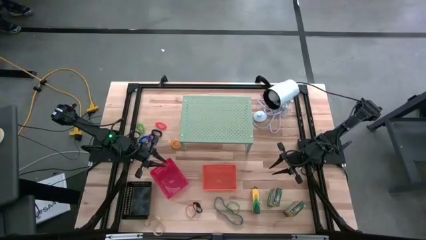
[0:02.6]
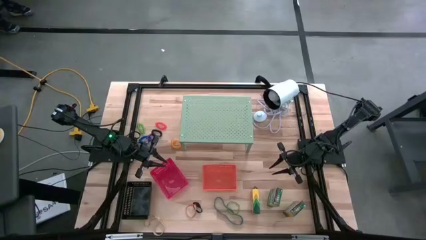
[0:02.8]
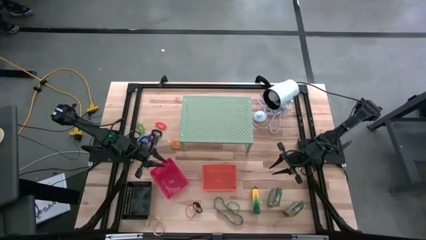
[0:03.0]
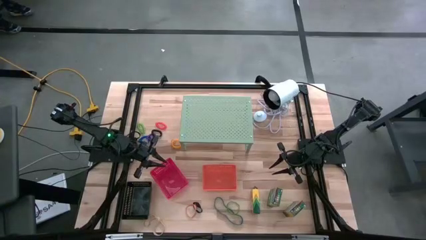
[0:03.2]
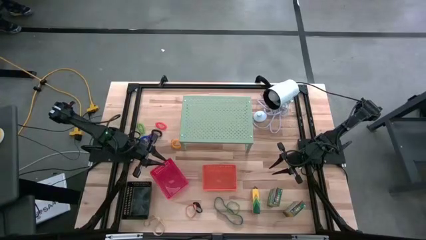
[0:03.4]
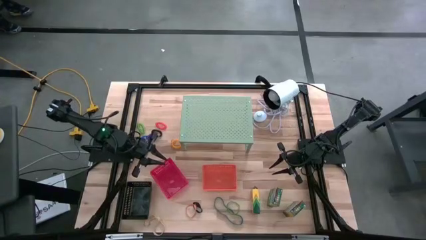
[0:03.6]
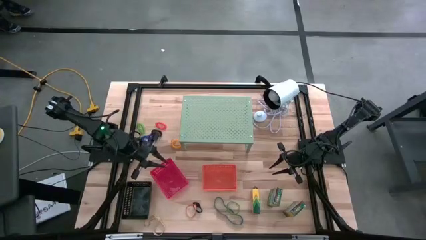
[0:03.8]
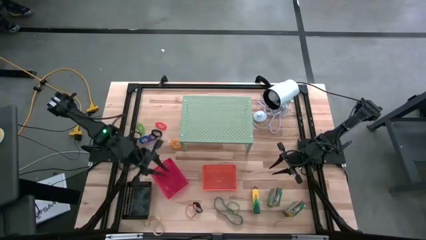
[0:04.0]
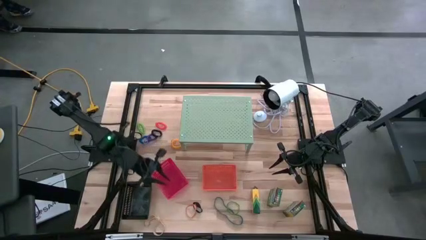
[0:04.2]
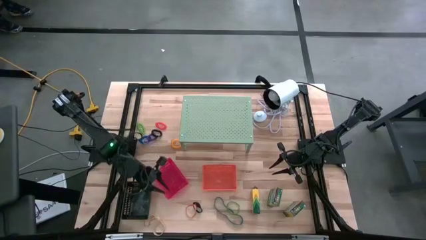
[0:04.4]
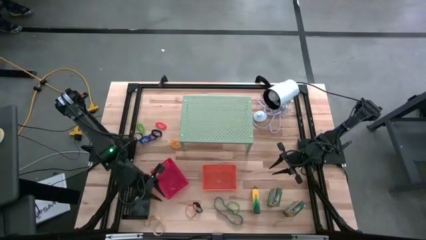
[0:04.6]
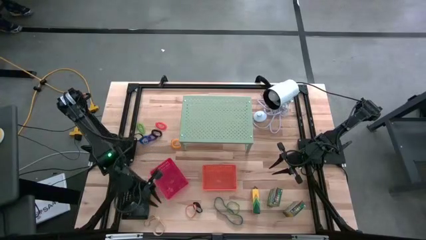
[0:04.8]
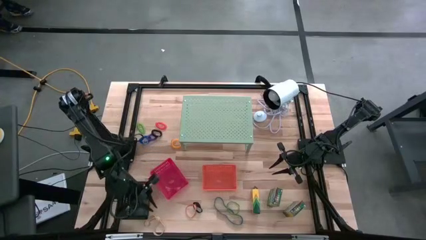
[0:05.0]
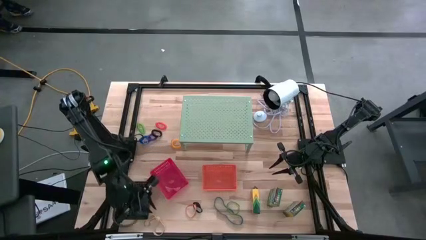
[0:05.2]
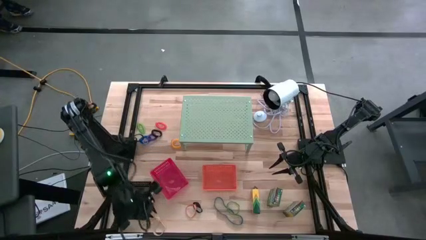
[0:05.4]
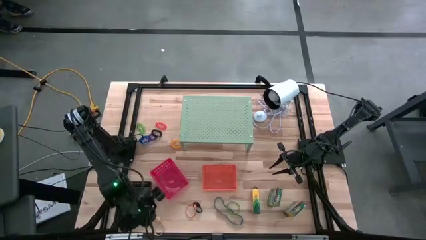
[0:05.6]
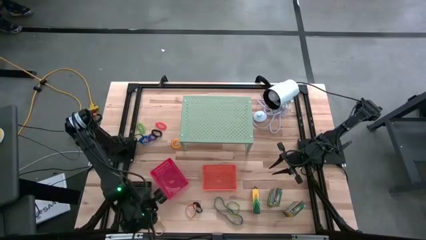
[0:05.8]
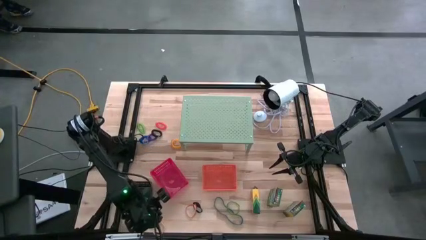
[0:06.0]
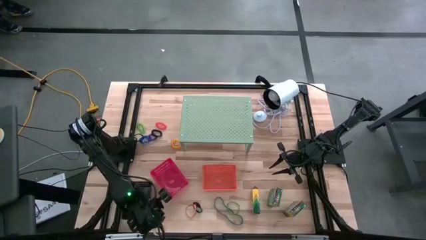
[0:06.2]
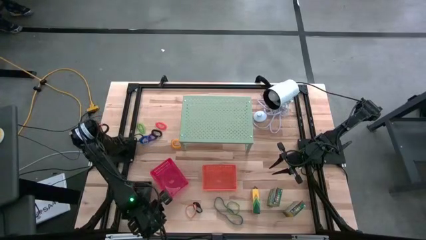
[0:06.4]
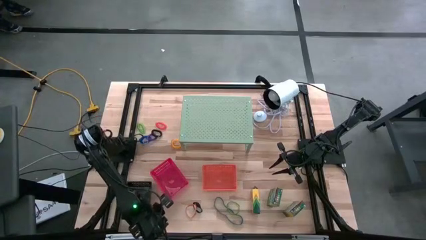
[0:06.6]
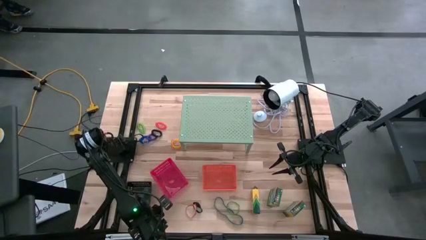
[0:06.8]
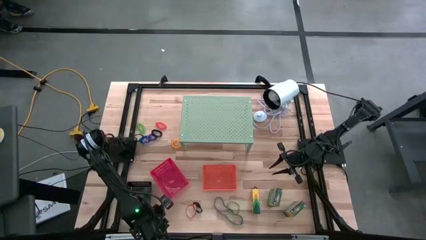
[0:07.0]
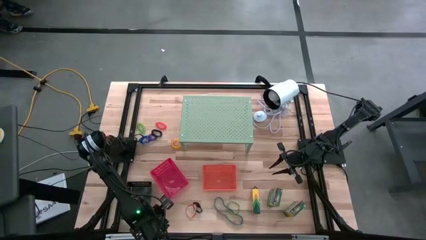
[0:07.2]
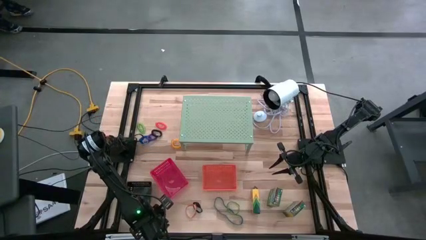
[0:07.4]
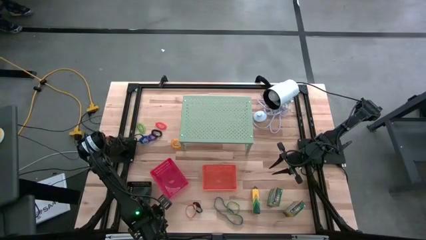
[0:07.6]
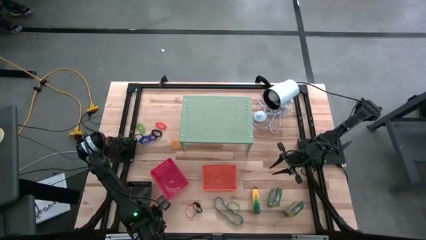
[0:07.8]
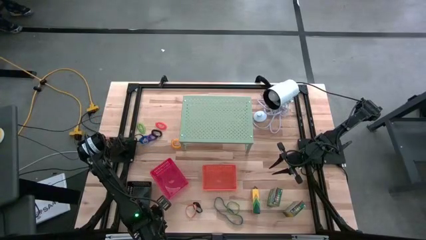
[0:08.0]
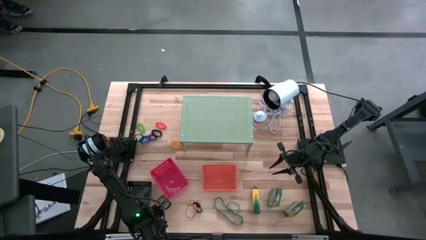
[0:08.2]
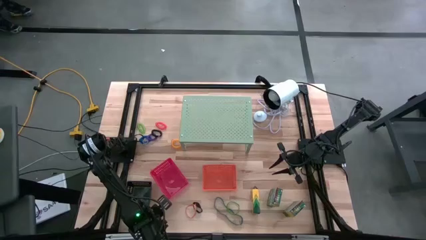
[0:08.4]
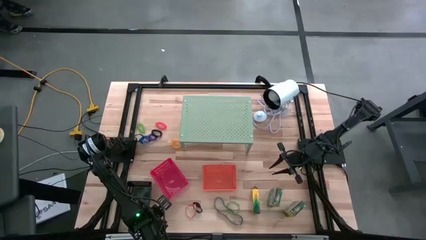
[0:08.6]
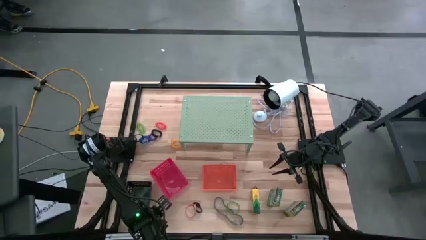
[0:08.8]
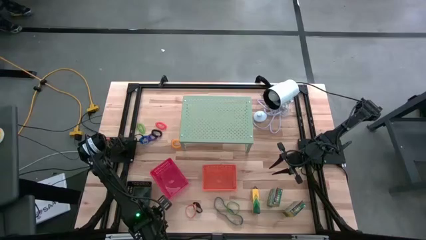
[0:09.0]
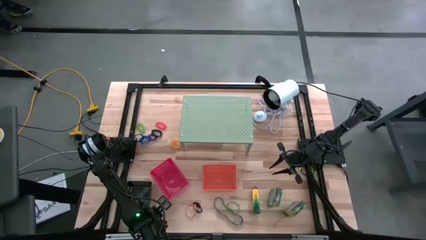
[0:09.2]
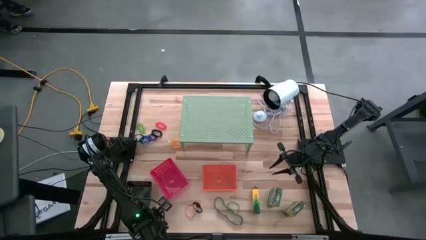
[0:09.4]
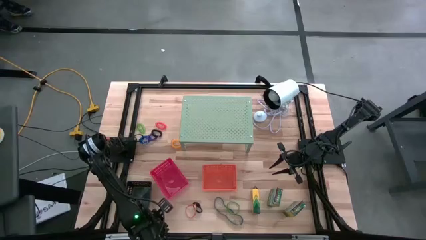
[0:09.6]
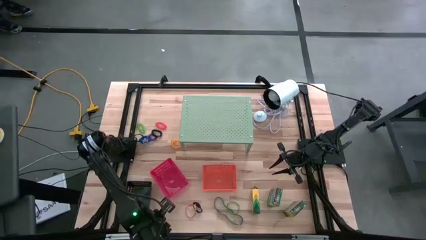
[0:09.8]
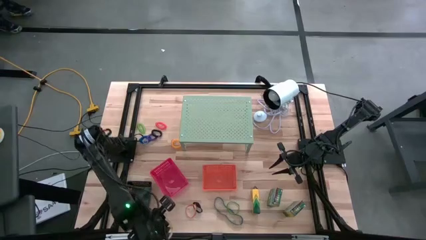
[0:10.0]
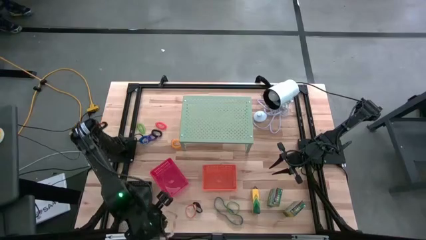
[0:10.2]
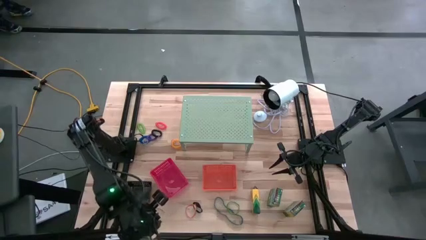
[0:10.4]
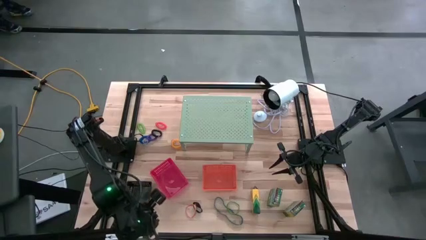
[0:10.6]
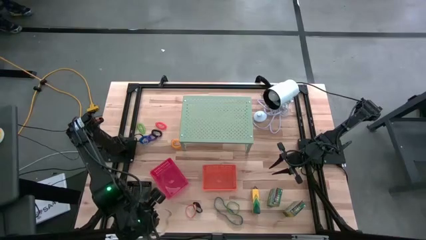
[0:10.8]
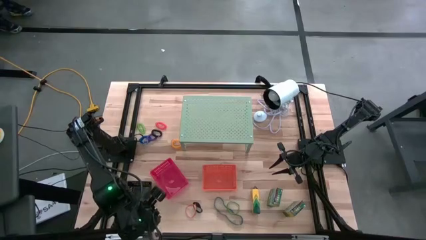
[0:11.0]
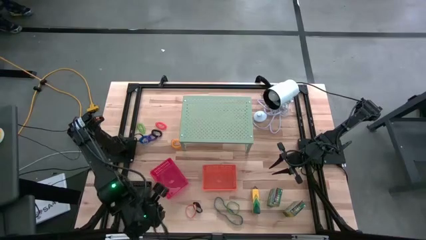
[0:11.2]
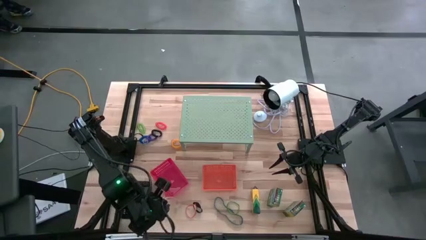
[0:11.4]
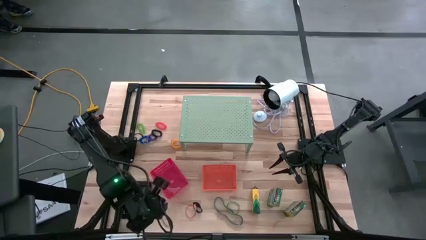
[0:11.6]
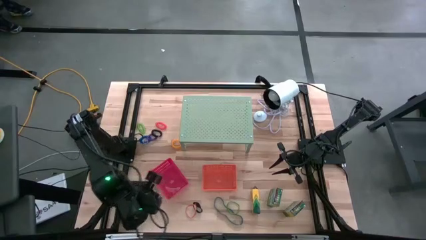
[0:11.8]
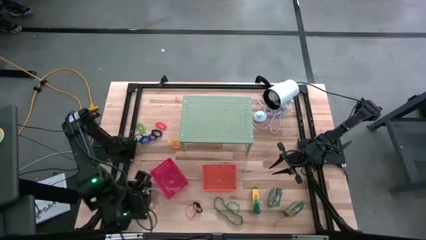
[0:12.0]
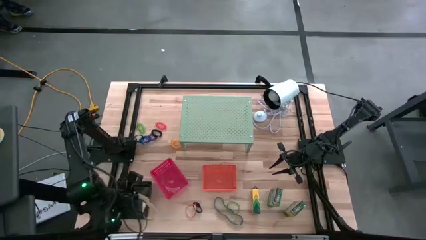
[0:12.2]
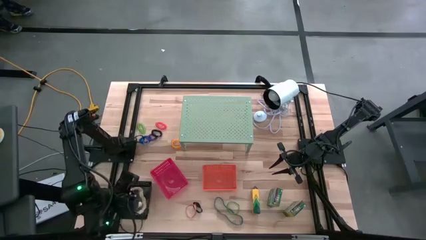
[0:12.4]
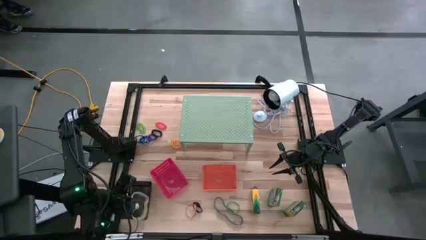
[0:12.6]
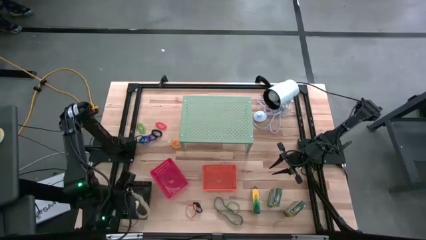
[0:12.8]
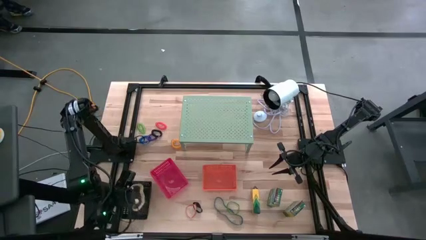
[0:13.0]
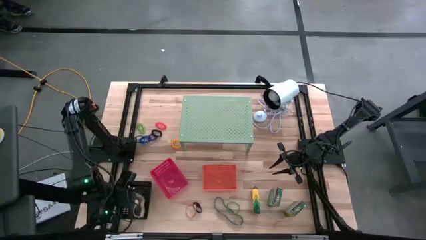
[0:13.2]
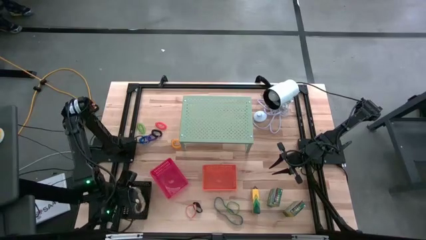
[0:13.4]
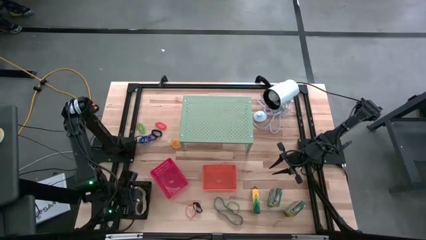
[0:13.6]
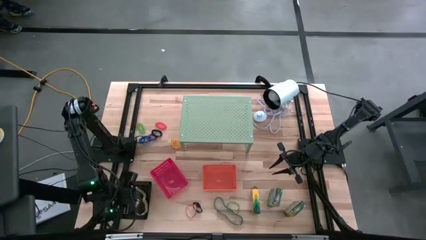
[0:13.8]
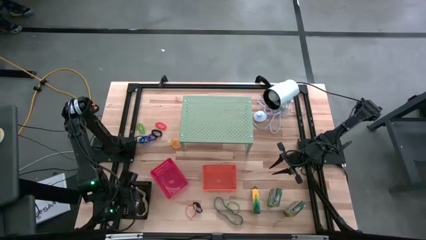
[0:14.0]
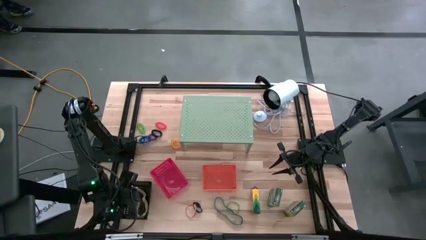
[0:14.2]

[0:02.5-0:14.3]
Task: Pick & Place Office Desk Supplies
Put the white rubber band into the black bin
